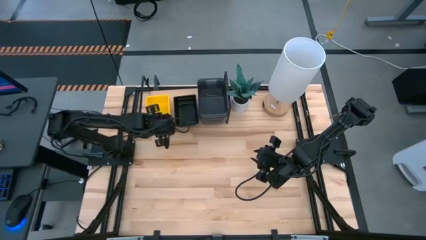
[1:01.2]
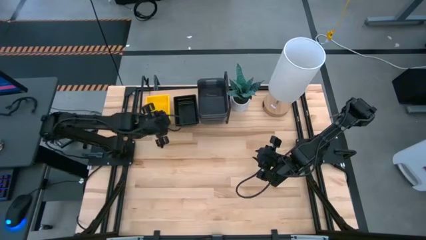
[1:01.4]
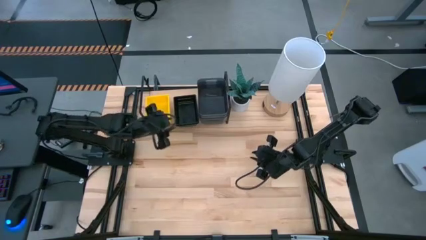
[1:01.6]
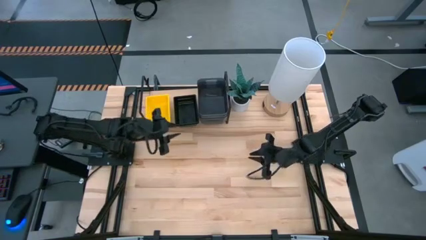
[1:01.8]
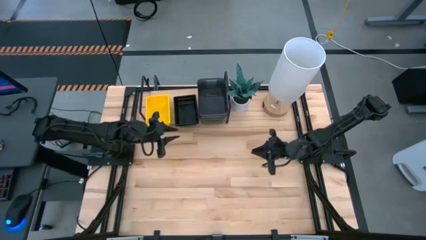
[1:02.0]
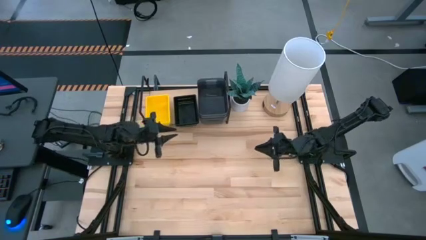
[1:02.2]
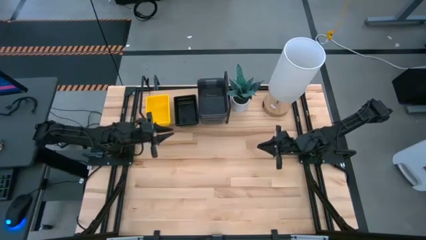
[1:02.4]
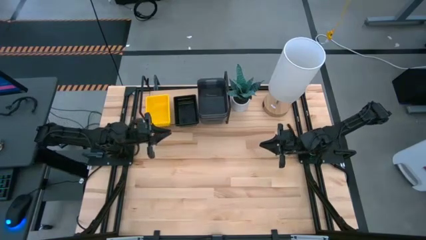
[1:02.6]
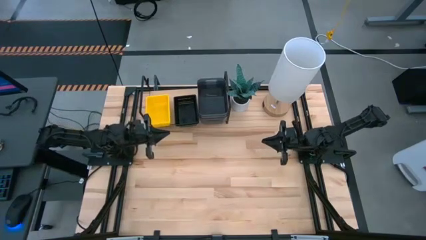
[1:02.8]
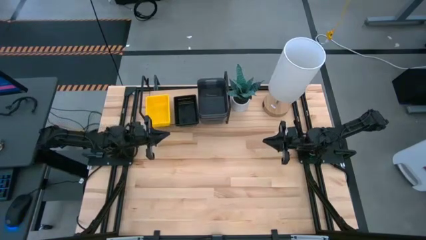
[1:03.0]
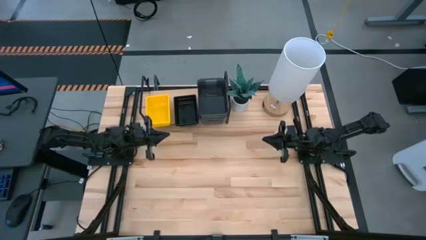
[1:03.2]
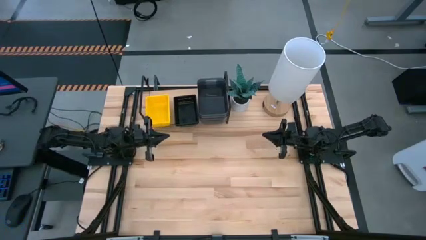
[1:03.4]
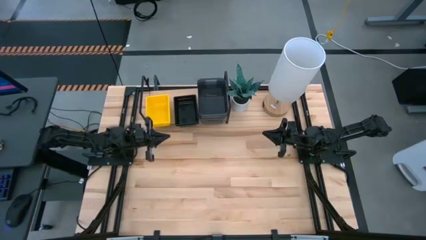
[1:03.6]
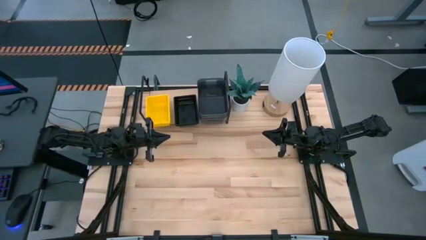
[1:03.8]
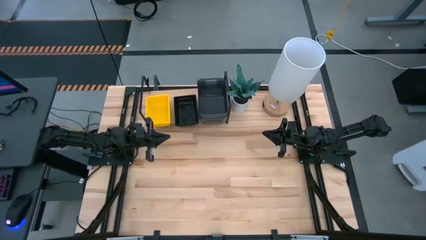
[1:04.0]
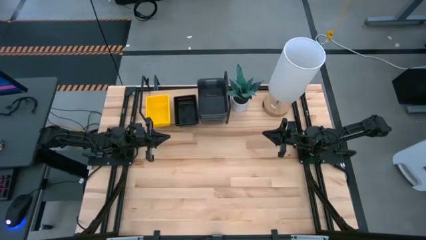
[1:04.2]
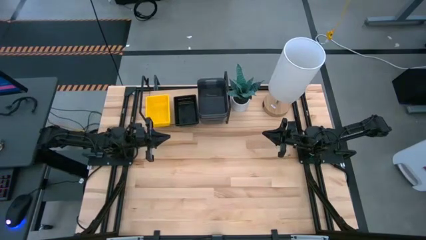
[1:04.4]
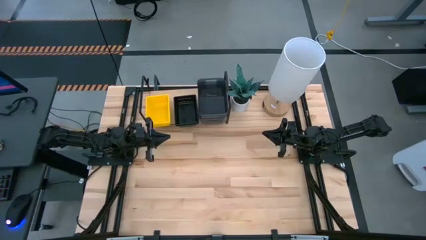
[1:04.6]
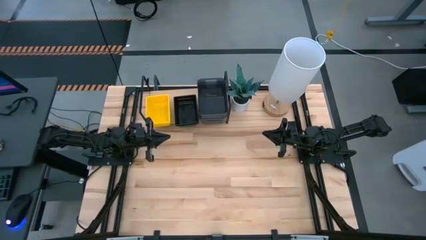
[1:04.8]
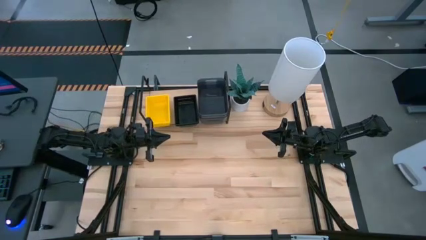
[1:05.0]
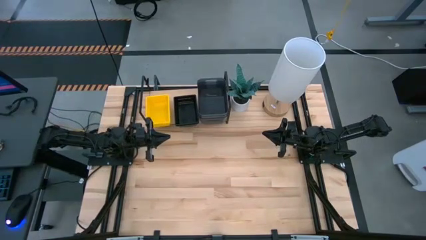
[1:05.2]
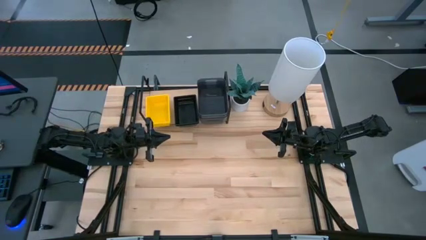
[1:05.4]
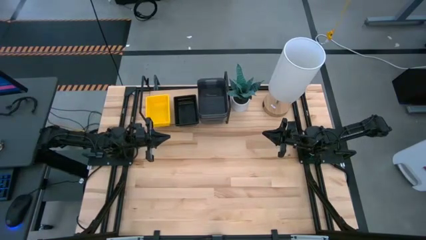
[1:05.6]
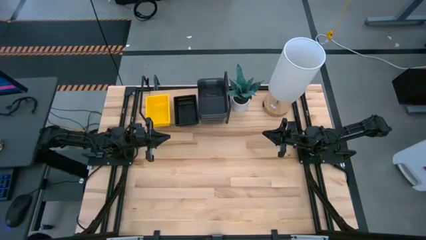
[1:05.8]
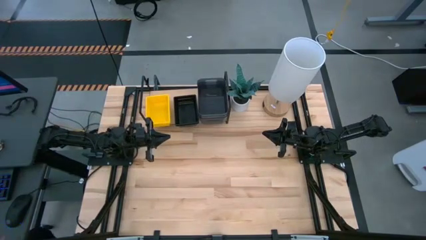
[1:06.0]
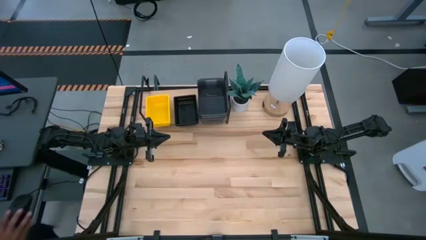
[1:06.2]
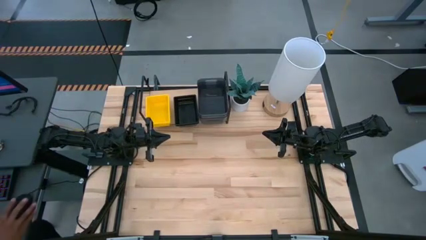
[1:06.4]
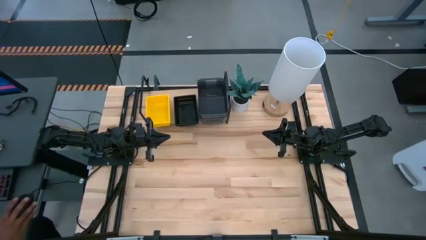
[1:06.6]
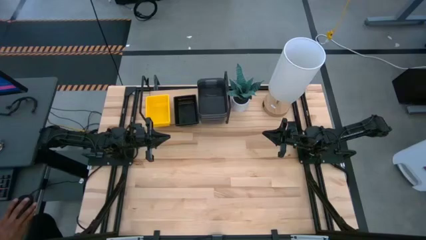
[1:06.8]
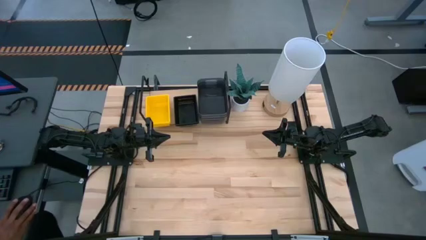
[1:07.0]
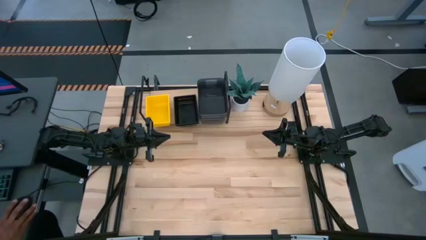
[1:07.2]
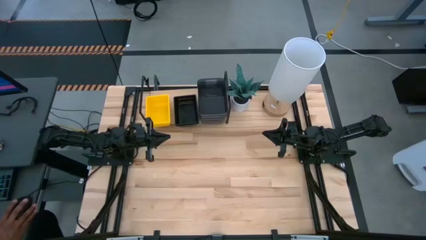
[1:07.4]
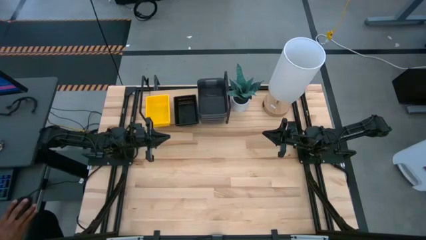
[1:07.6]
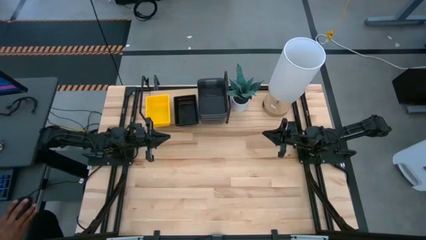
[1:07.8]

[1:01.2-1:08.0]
Task: Stack baskets on shelf by color
Return to Home Position

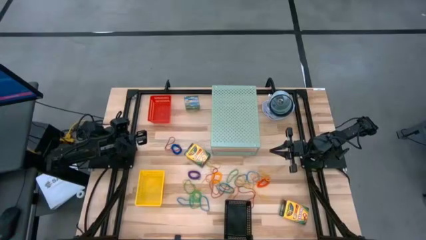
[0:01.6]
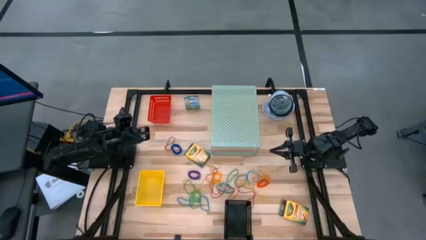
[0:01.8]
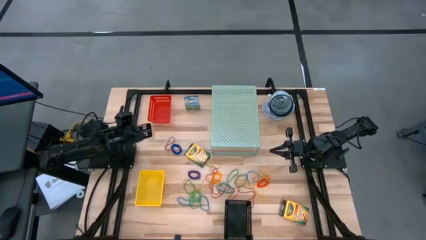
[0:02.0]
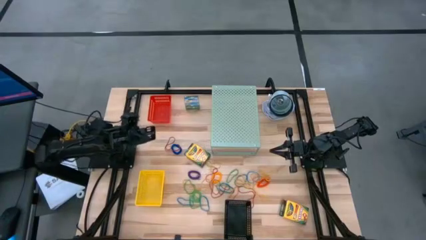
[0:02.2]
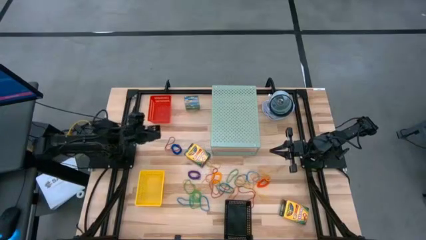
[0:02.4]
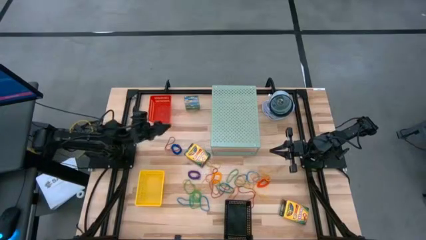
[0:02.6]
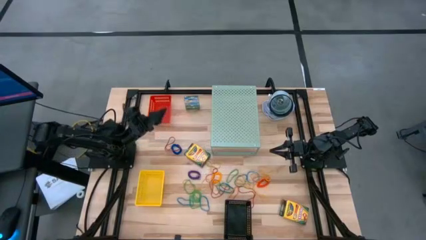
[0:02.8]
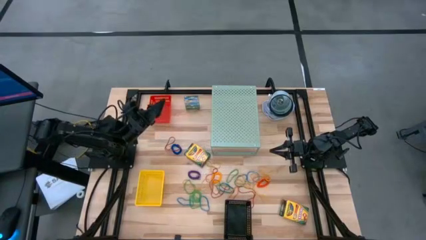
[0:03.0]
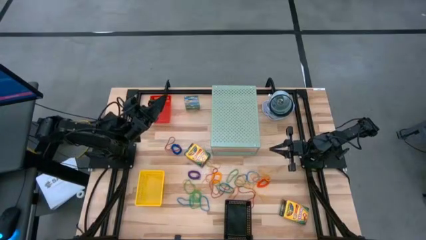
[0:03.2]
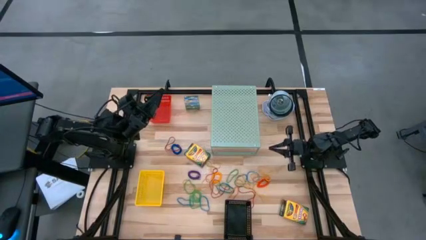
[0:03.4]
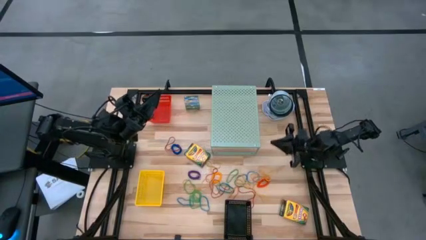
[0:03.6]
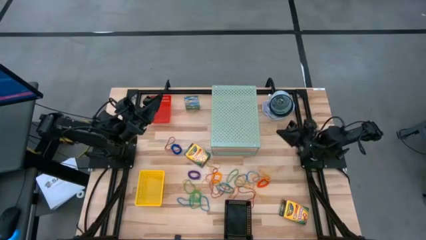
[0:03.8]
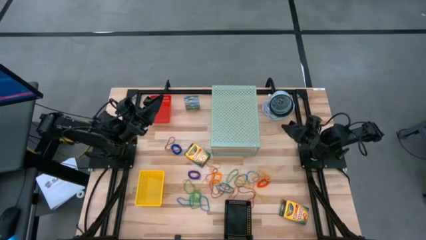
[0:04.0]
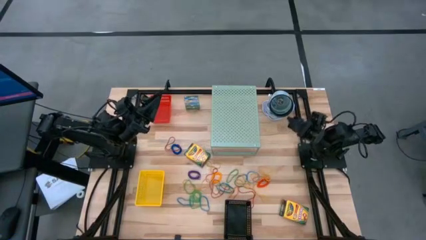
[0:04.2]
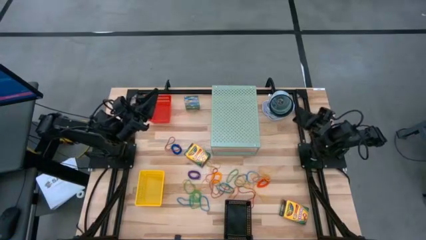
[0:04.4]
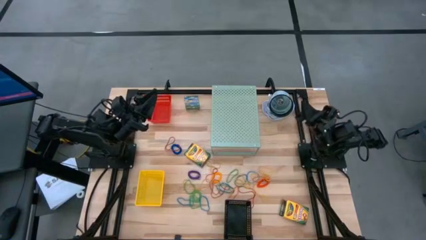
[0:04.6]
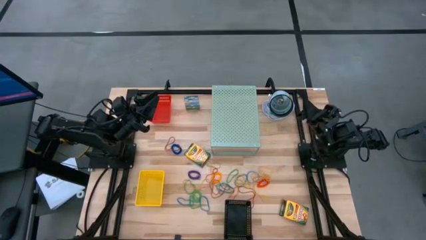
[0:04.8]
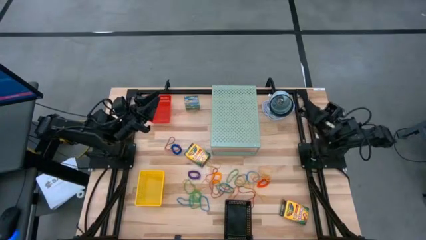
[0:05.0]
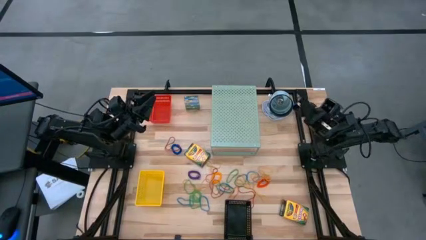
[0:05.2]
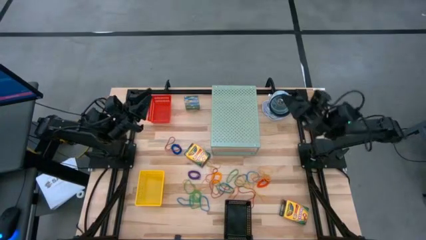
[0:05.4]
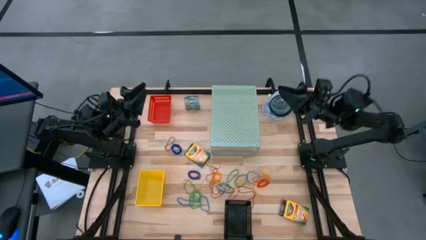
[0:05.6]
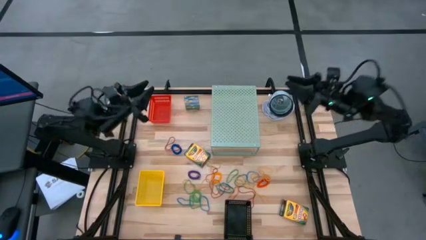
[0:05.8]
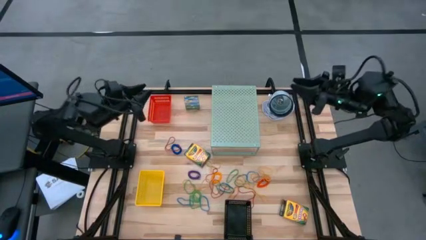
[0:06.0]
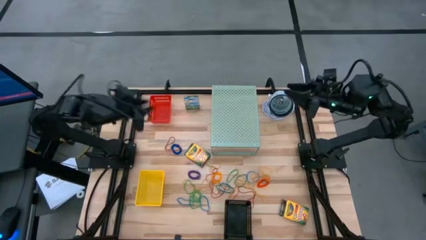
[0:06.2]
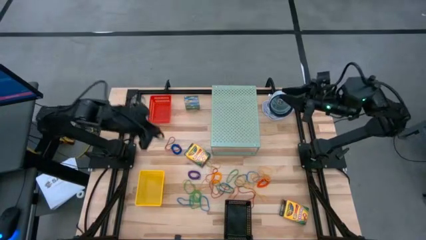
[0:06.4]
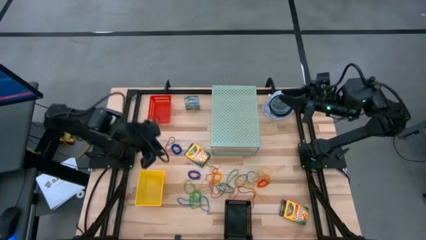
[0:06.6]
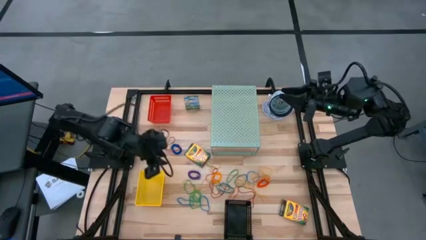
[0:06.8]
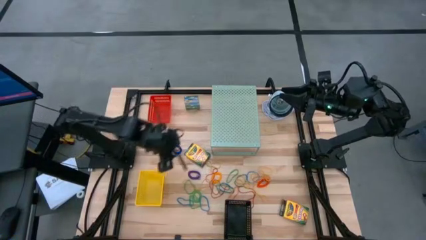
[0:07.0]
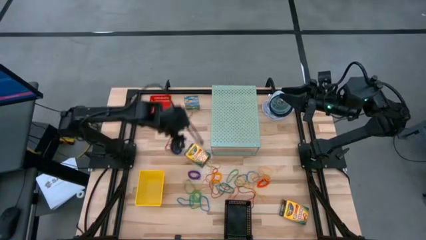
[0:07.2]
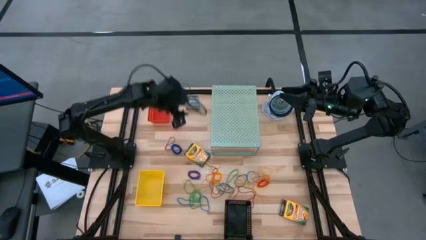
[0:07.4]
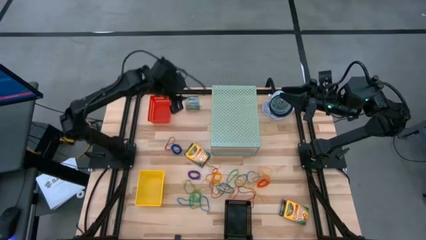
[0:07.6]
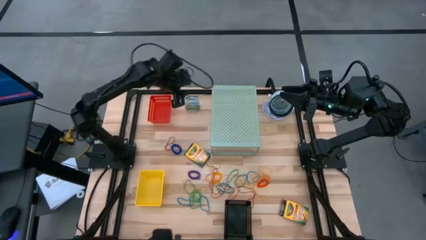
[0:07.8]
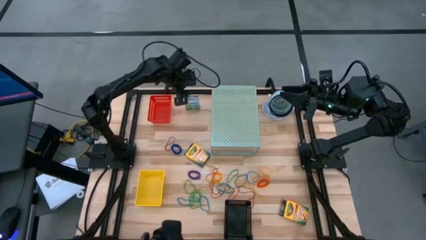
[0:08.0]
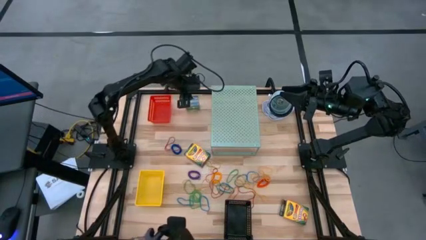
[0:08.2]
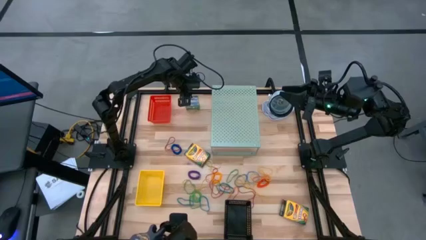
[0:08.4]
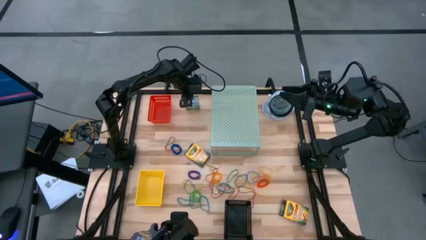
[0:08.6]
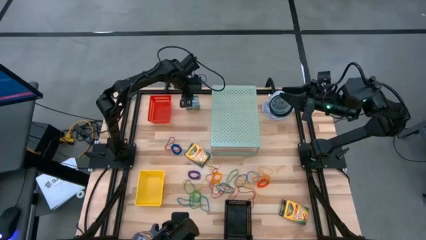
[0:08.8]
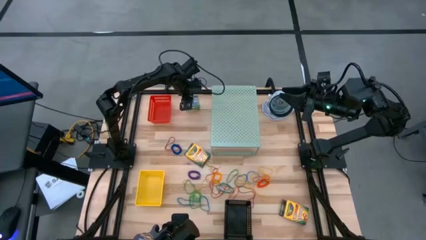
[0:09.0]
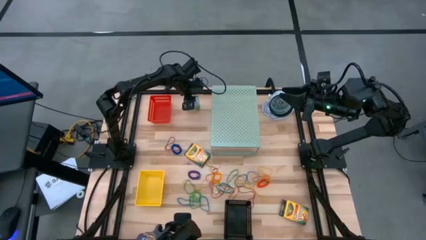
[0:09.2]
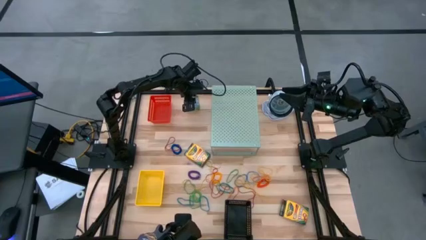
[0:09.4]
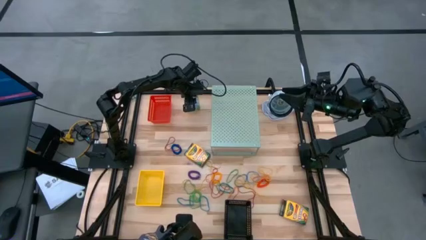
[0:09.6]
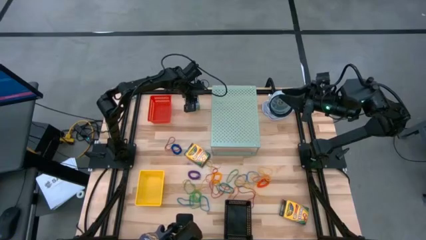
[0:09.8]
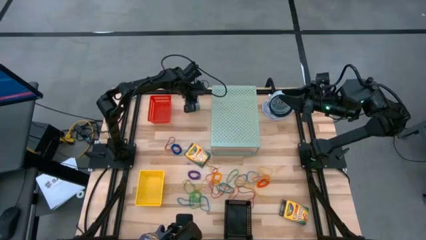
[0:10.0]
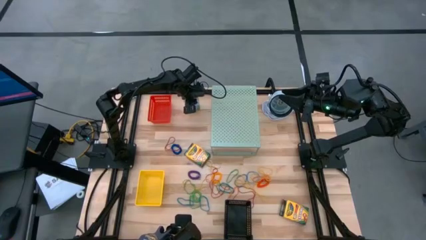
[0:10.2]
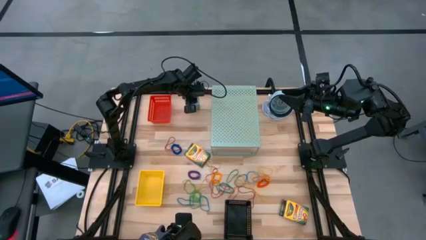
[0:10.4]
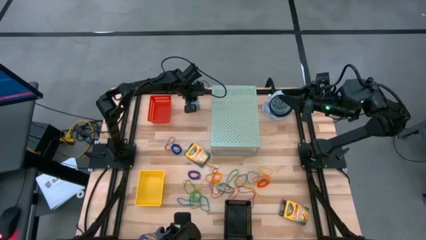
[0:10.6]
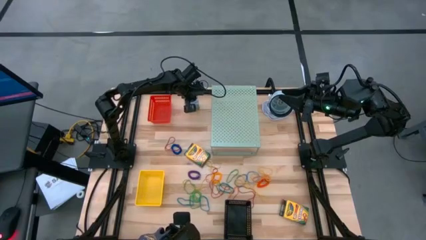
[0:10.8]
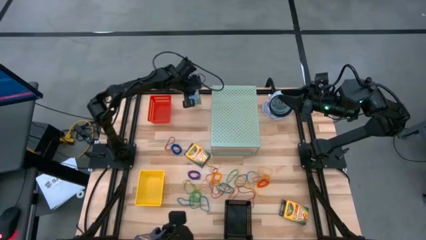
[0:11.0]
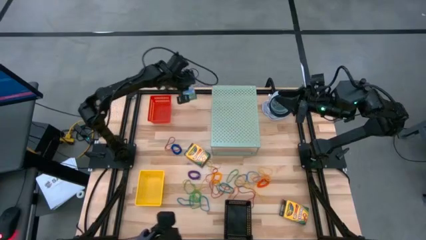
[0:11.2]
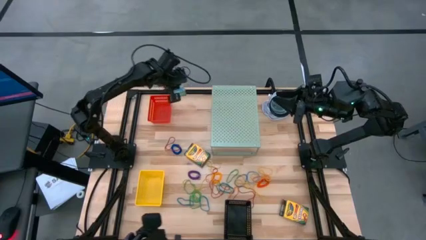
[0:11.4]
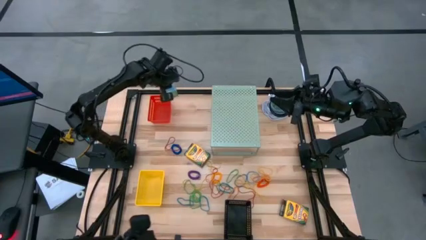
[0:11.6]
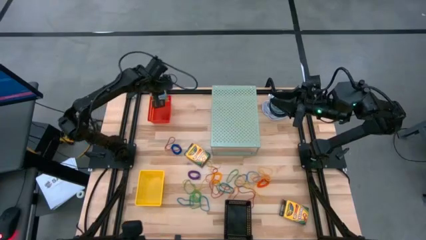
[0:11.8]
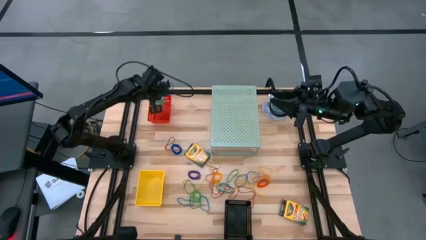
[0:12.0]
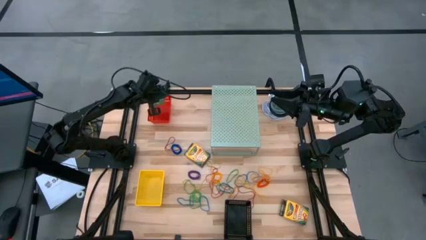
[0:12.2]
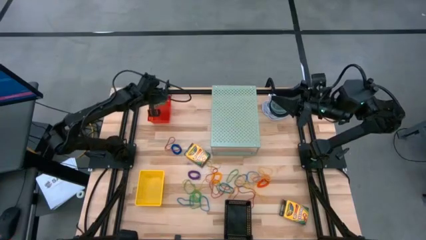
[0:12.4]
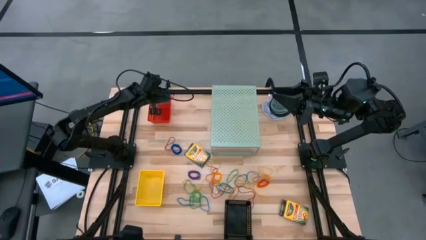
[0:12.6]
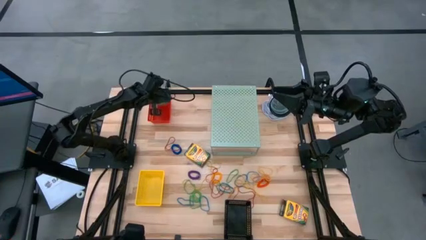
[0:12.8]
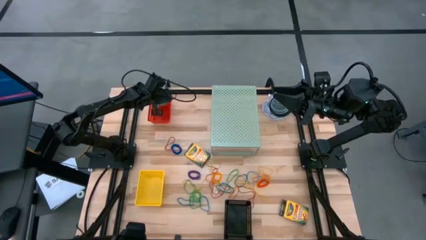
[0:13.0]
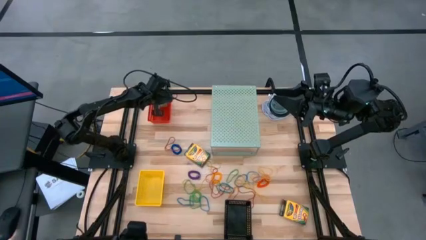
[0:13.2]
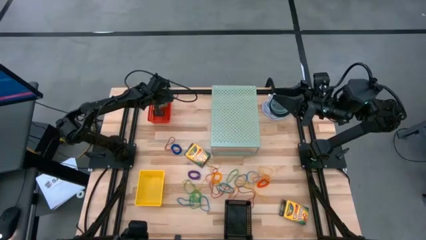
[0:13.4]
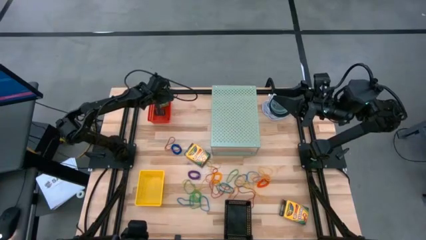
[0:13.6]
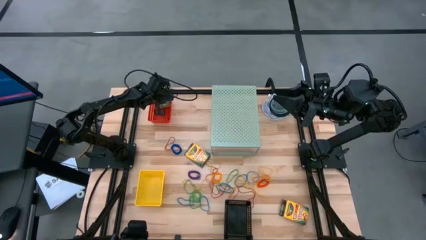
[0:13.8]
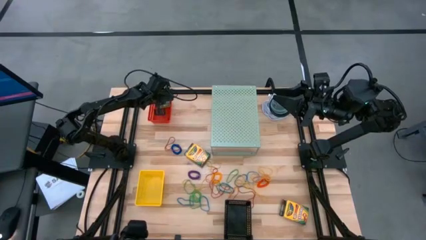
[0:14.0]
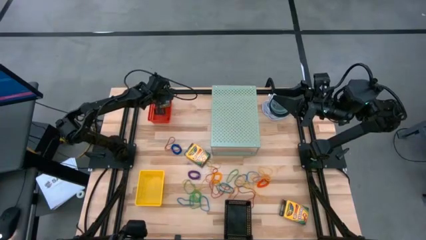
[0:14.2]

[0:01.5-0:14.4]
Task: Pick & Place Office Desk Supplies
Put the crayon box into the red bin
